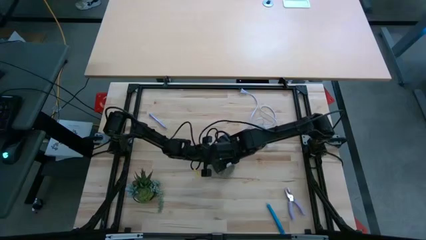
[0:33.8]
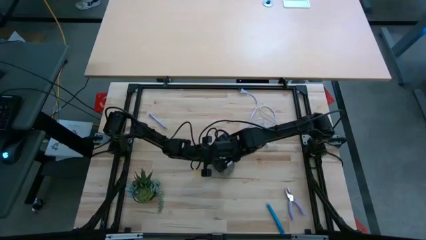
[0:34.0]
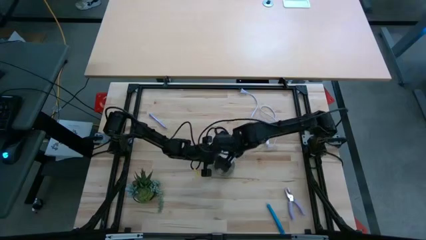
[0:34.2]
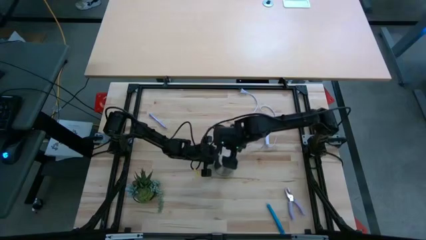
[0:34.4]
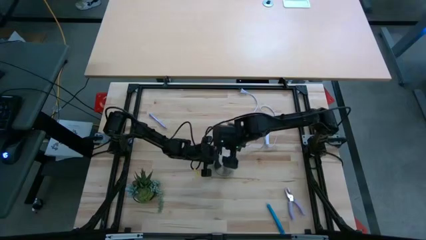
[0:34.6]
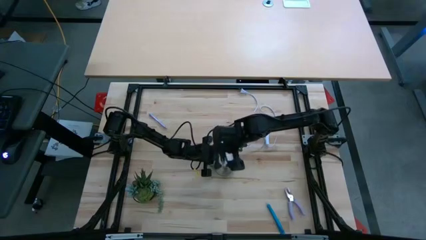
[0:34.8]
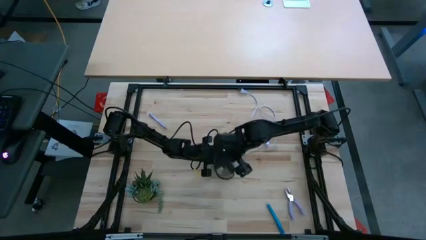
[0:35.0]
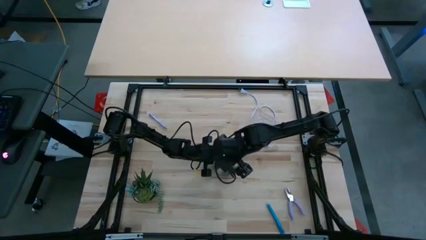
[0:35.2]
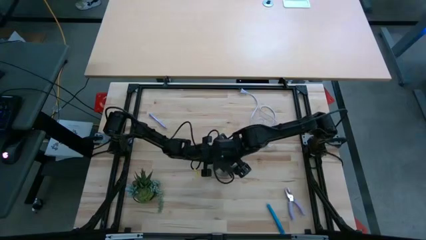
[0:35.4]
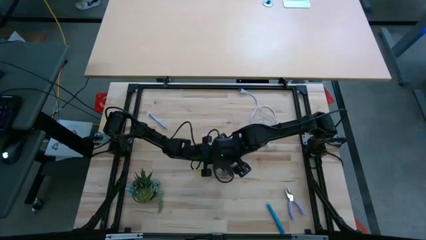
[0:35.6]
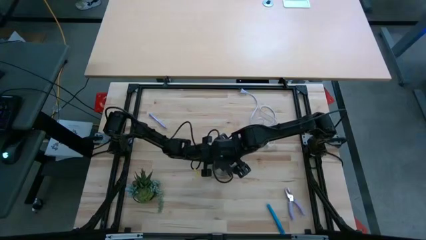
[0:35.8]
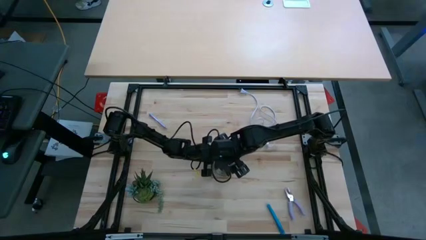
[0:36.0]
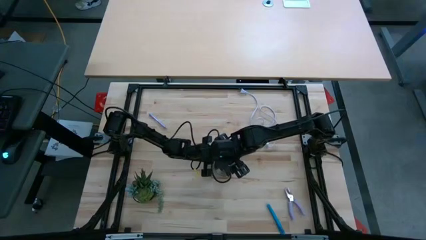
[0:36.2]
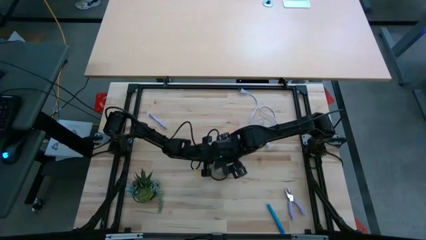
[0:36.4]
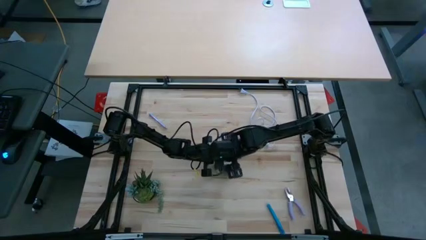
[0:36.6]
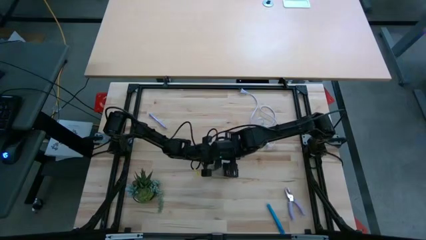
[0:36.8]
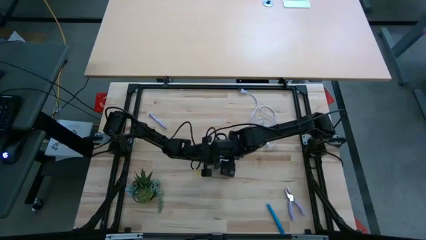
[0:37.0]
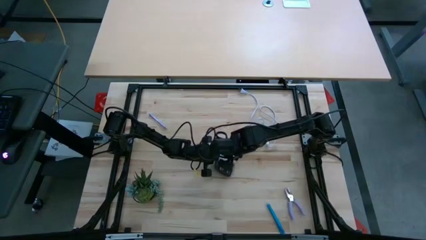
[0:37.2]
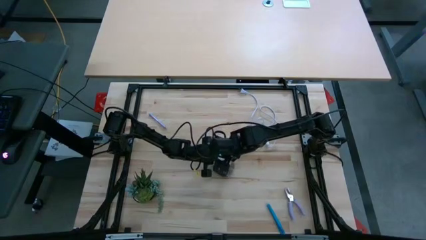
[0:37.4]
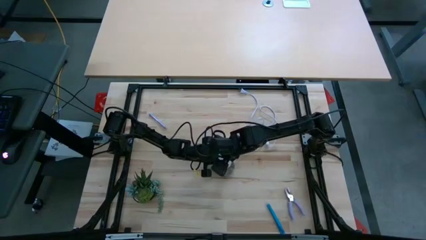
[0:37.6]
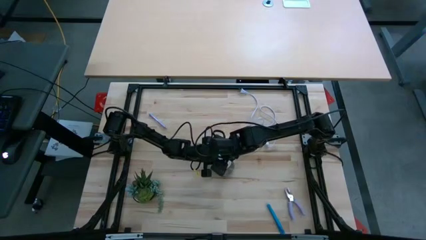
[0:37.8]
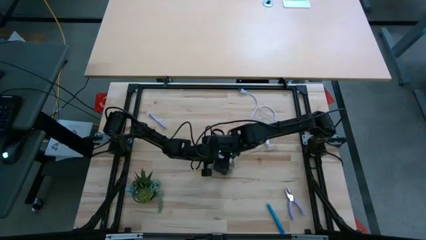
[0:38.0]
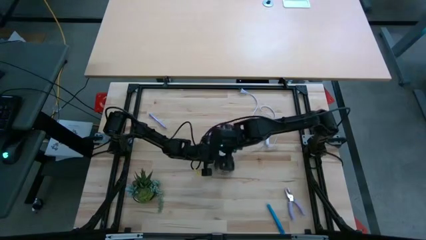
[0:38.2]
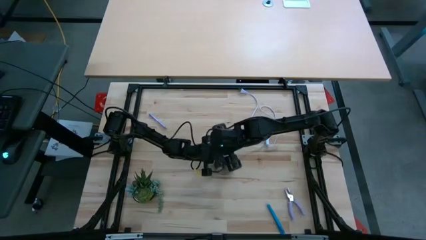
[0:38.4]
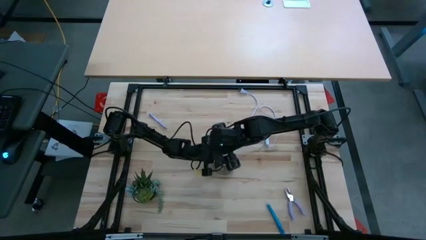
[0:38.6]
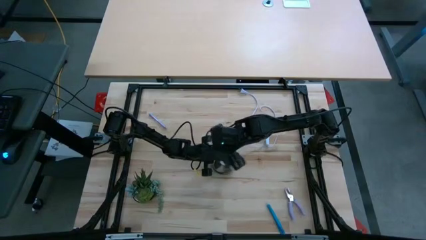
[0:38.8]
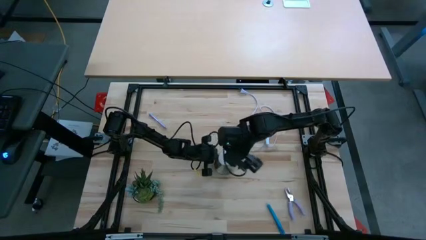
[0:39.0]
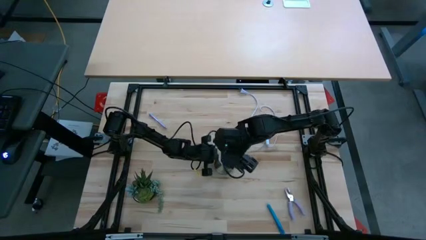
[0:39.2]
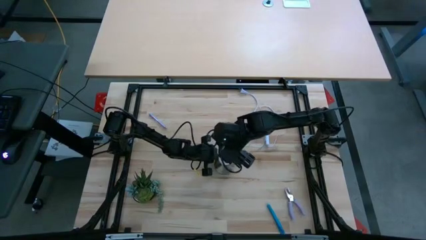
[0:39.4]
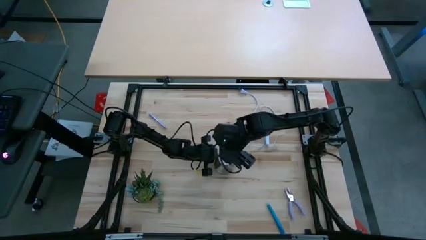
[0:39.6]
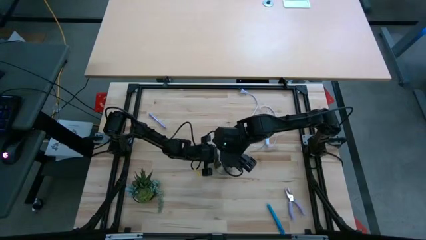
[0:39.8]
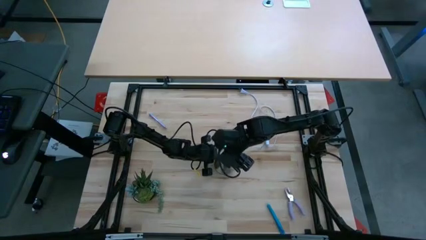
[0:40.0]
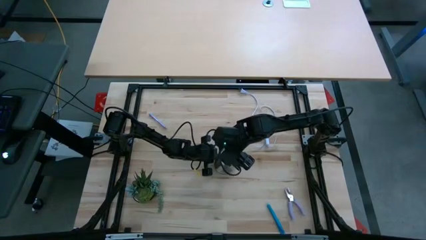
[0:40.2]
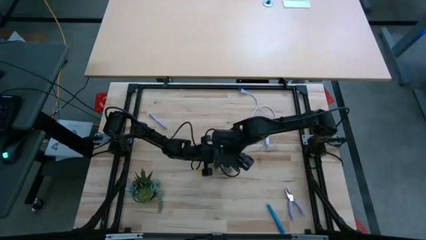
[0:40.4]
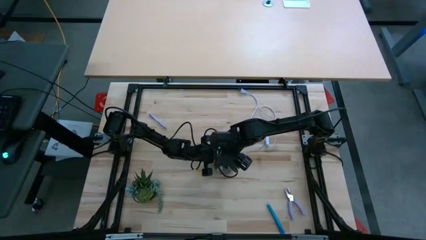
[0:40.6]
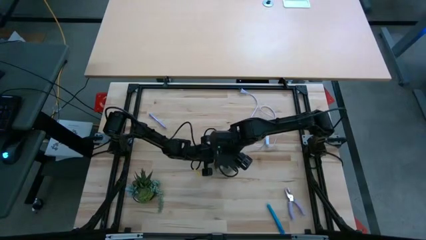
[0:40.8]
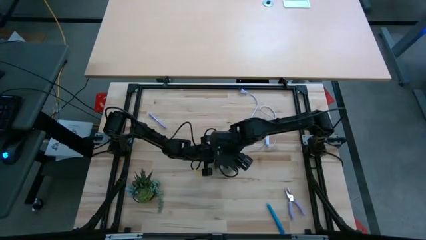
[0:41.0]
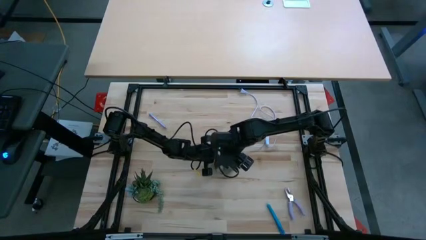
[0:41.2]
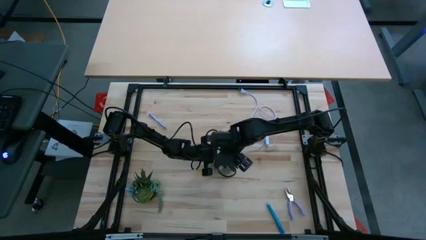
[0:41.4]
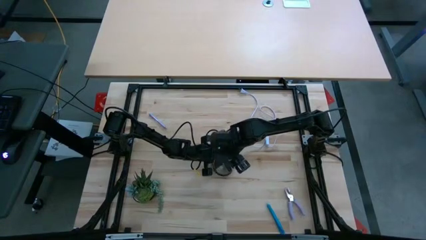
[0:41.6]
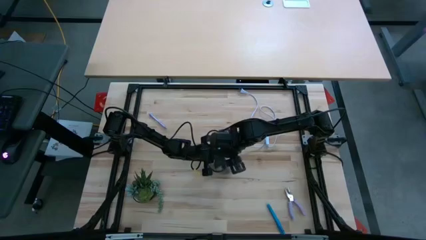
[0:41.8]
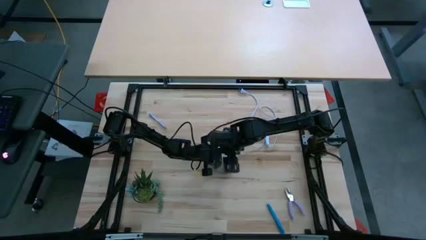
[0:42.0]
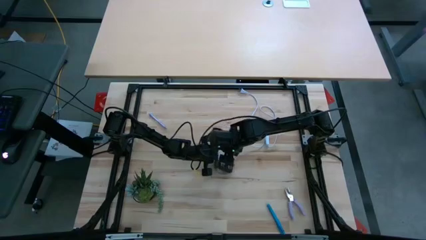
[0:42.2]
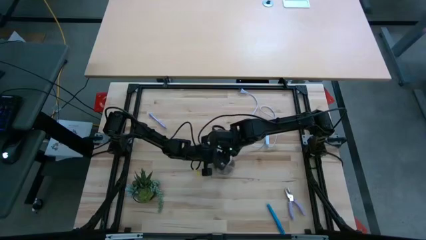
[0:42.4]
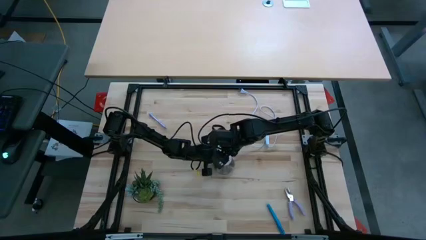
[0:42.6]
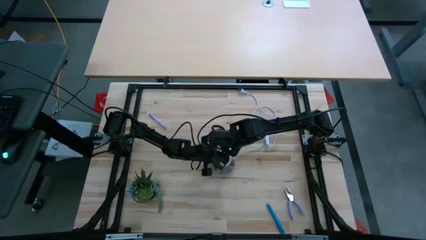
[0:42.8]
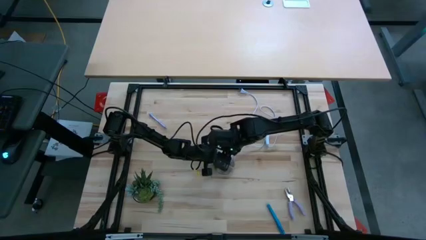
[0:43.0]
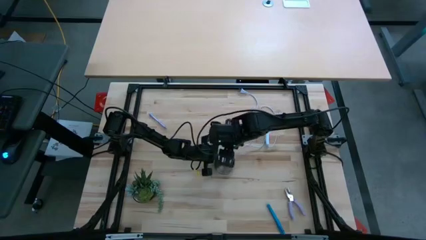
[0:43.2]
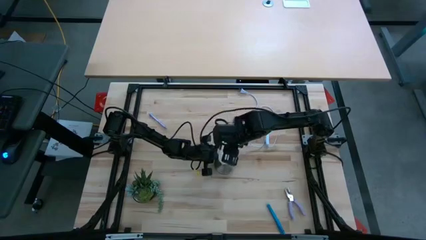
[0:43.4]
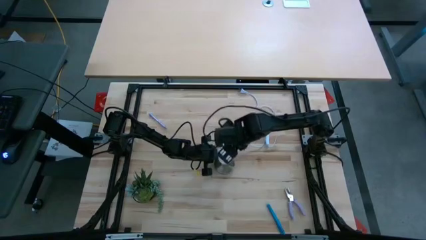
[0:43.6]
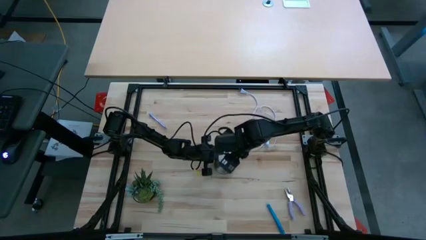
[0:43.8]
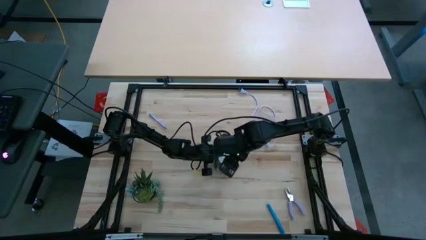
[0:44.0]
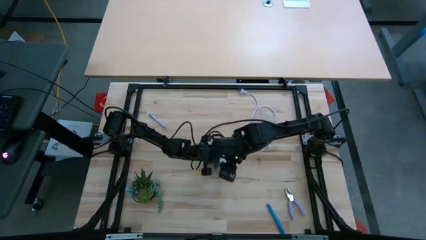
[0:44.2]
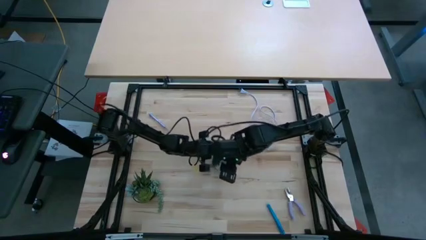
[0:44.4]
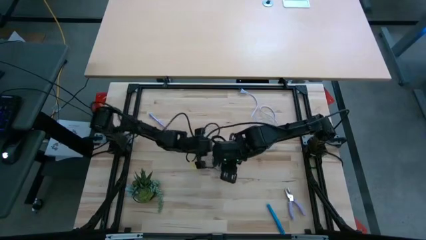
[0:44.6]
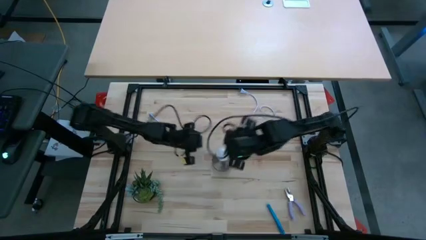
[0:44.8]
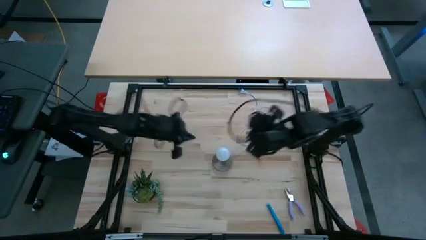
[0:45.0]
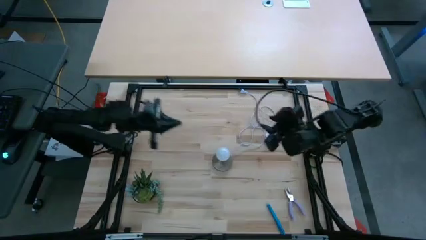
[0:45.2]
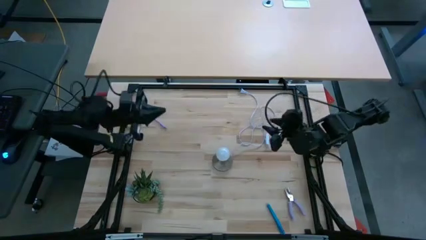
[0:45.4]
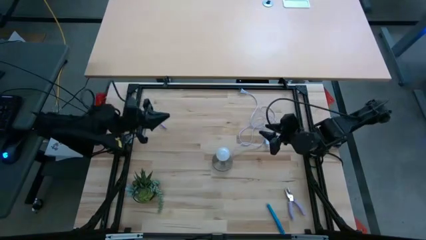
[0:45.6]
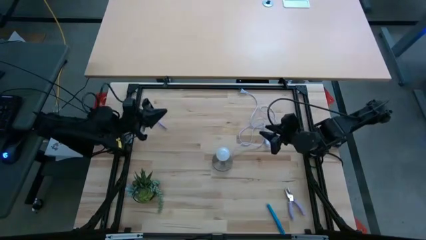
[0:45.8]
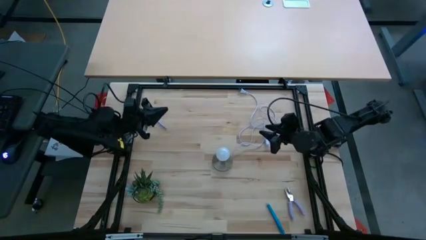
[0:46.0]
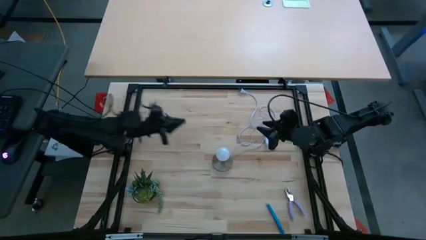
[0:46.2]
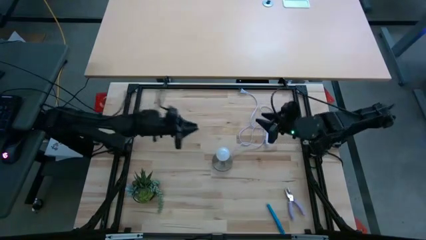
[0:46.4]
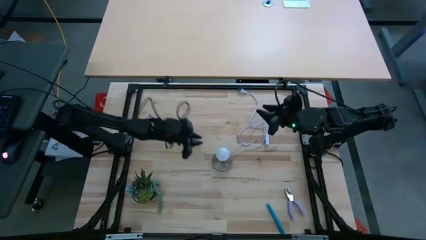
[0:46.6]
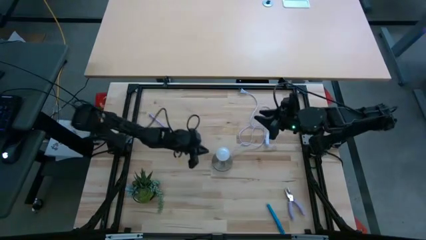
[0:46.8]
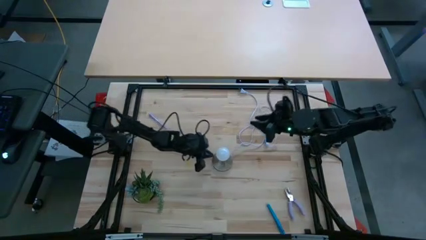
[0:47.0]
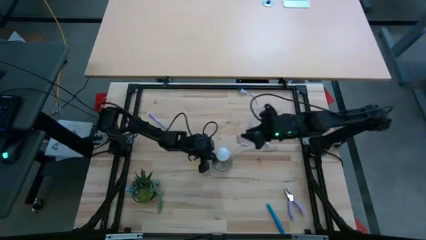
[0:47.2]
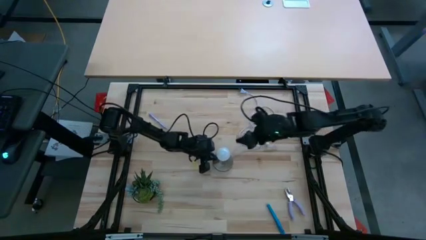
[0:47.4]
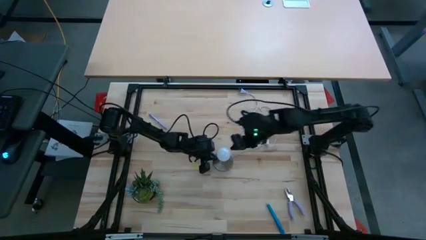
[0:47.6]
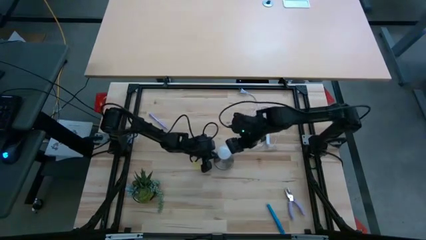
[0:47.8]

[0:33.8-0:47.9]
Task: Screw lightbulb
Insert the lightbulb in the lamp

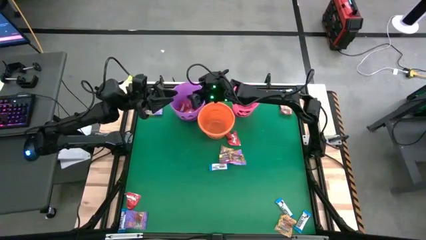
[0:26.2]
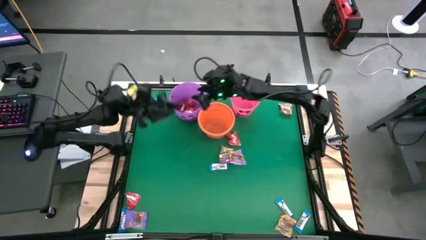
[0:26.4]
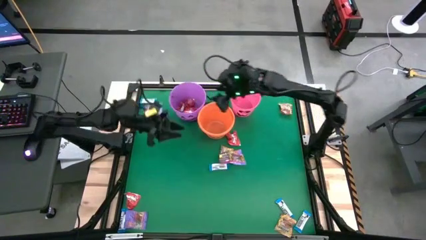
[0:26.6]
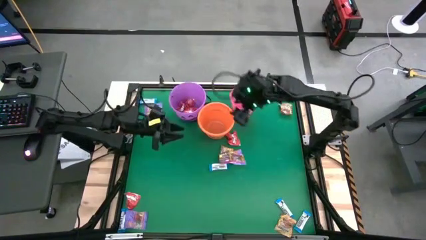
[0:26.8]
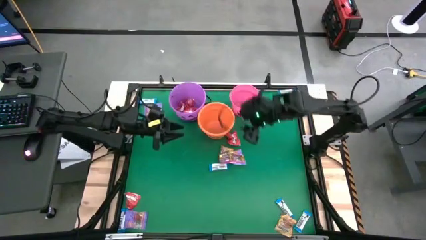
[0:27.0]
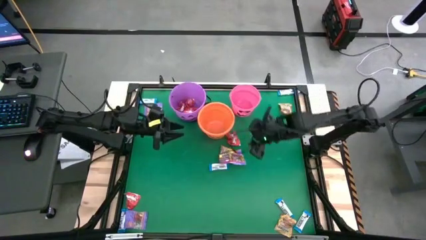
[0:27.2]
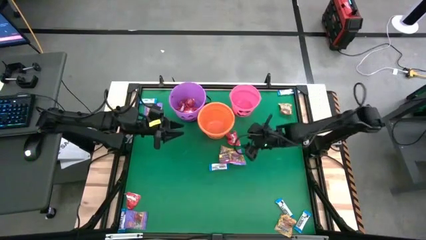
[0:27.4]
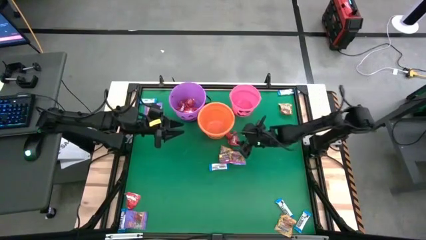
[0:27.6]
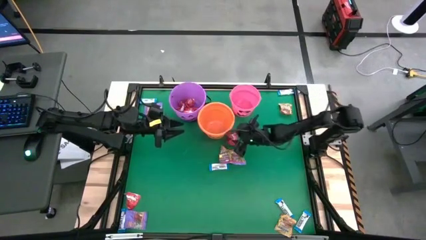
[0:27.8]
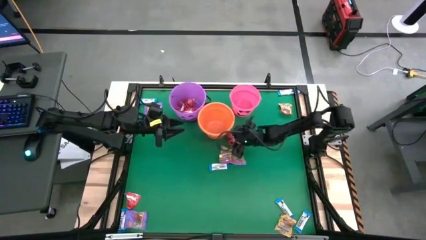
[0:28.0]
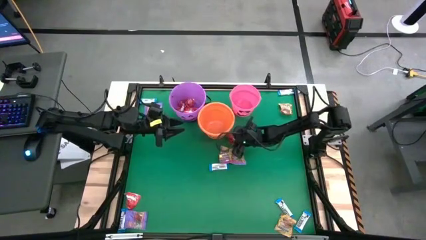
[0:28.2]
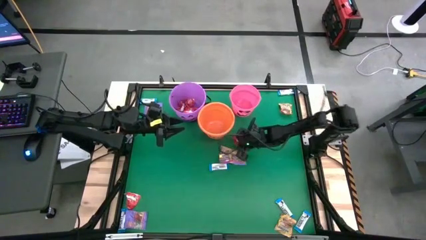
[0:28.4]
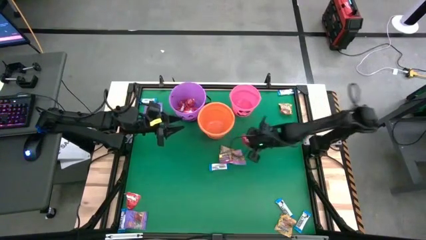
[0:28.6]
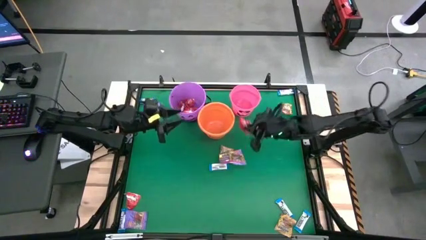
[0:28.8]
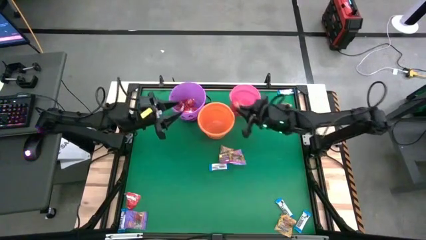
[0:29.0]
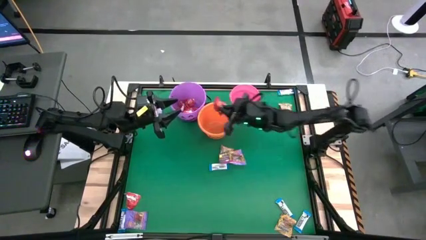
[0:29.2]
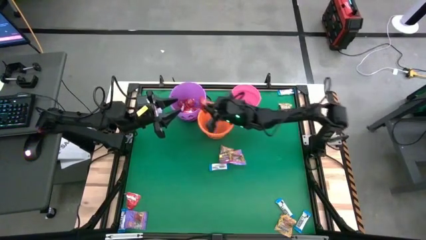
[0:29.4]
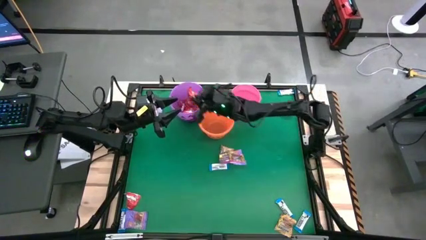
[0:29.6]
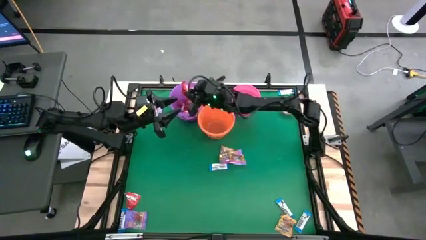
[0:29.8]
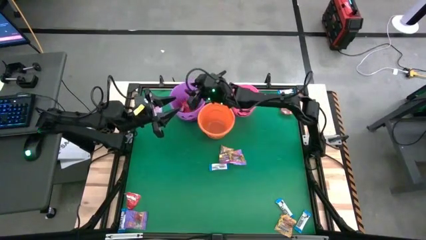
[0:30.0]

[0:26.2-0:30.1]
Task: Sort candy by brand, put in halloween buckets
Put the red candy into the purple bucket
